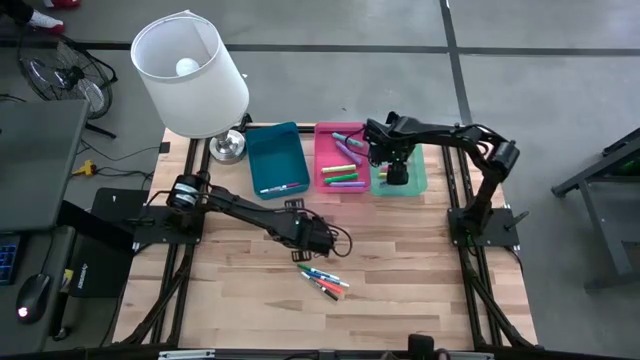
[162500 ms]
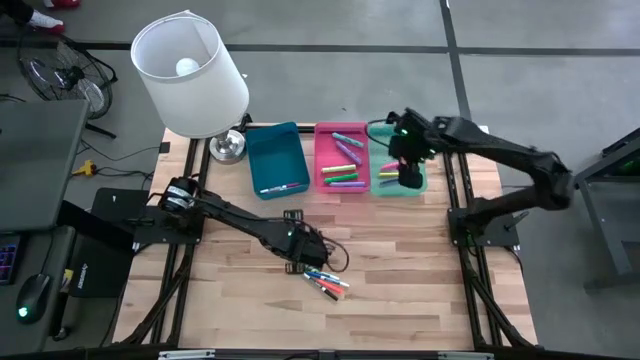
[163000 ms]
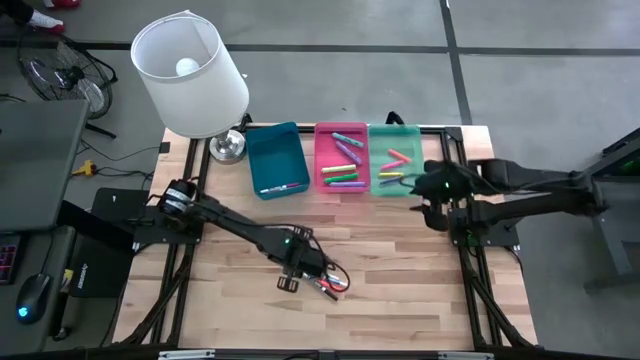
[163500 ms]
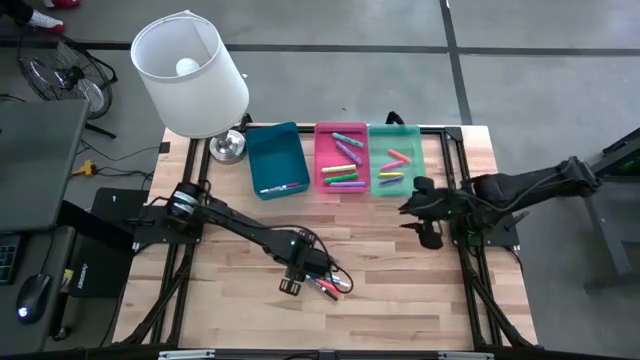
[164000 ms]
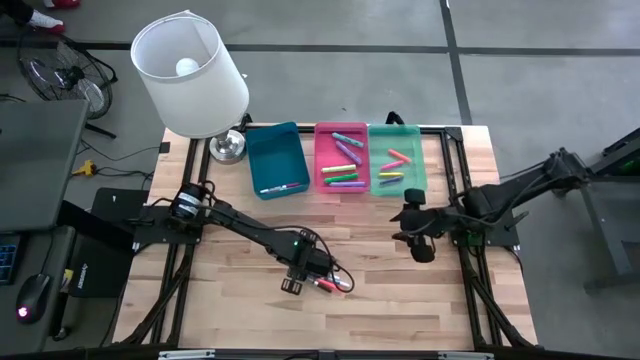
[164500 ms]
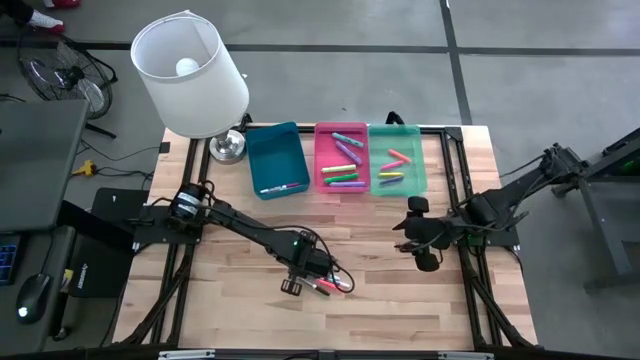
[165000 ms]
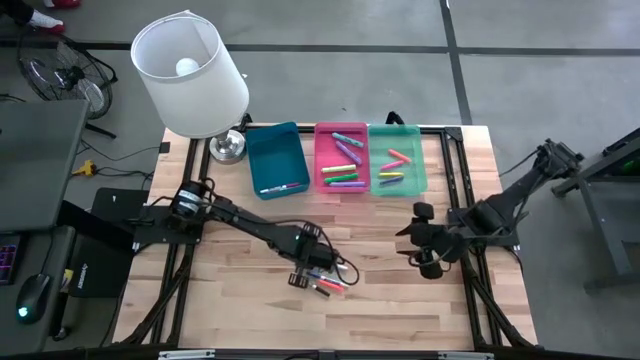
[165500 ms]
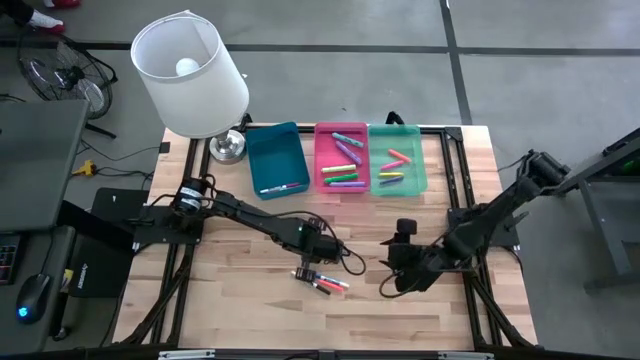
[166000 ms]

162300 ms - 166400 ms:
Task: Pick & Place Markers
Put the green dry erase marker into the dark blue bin

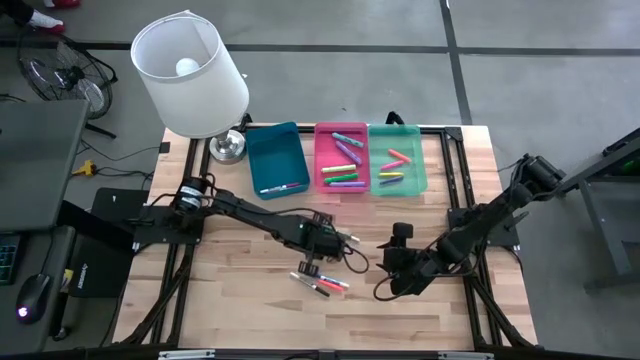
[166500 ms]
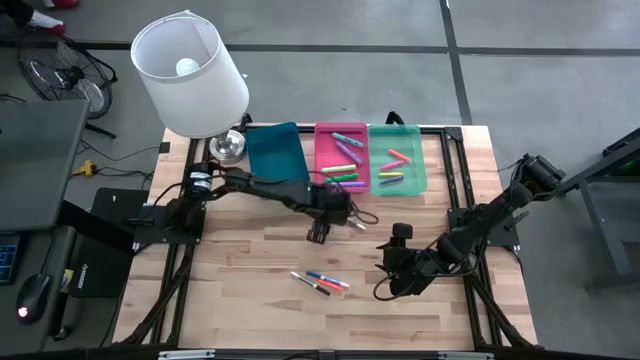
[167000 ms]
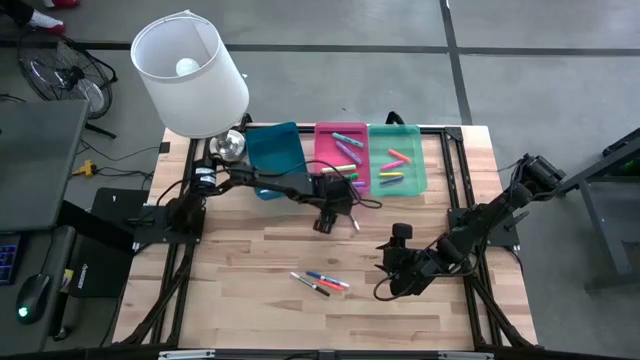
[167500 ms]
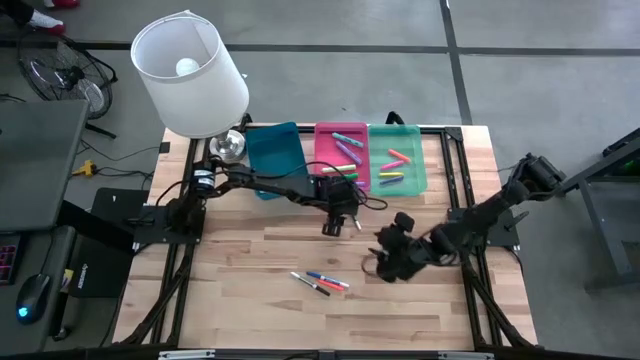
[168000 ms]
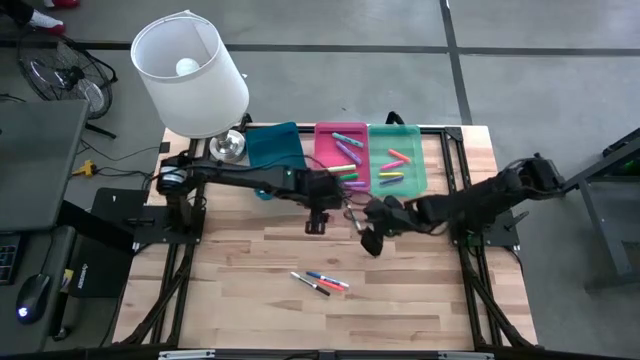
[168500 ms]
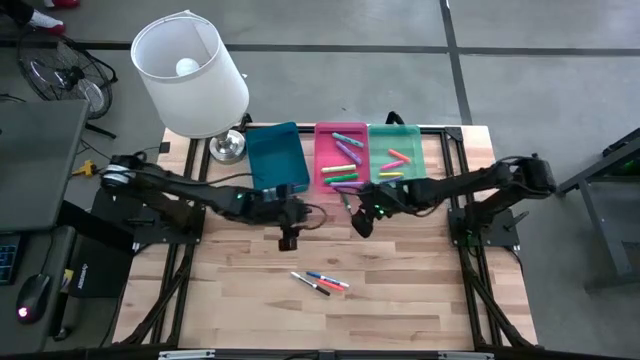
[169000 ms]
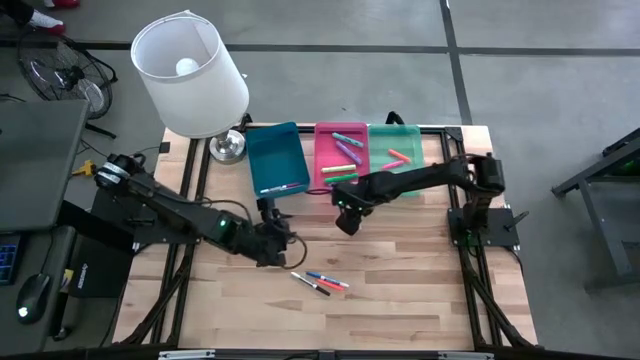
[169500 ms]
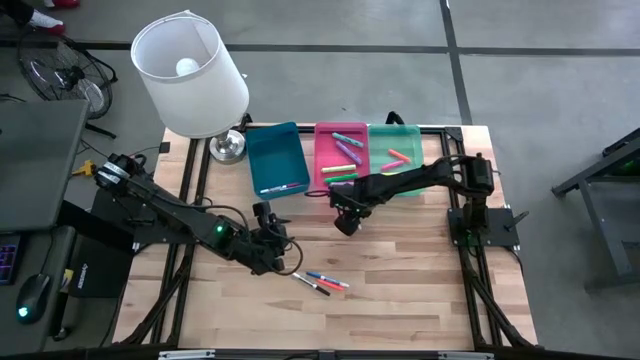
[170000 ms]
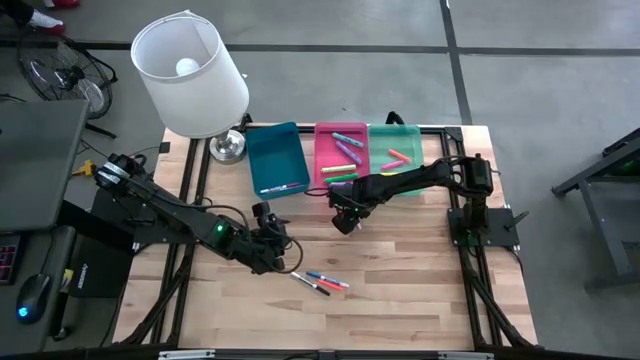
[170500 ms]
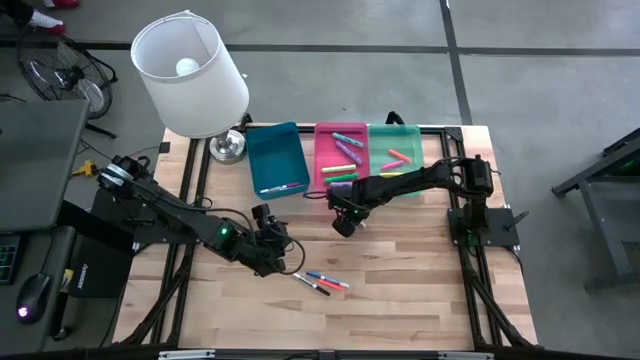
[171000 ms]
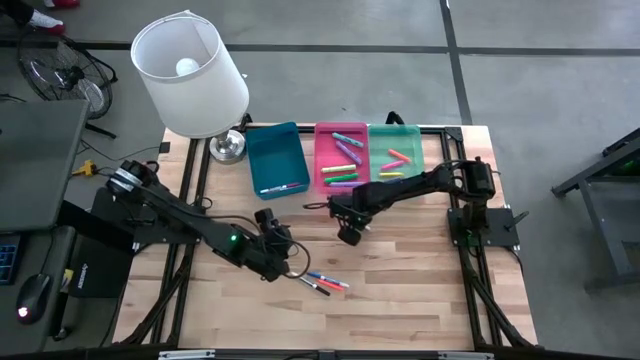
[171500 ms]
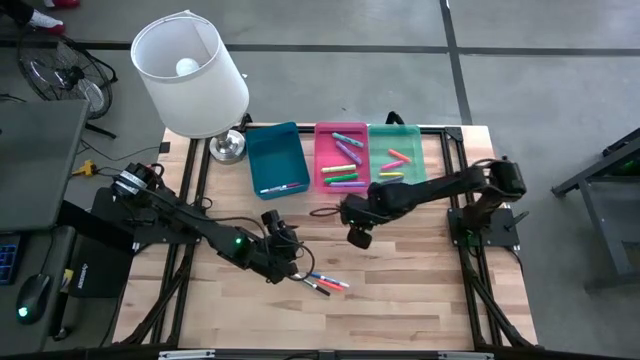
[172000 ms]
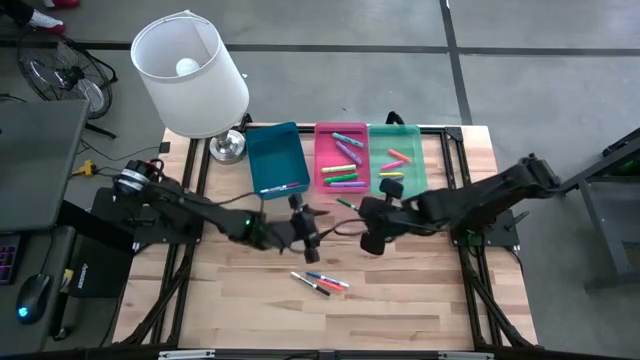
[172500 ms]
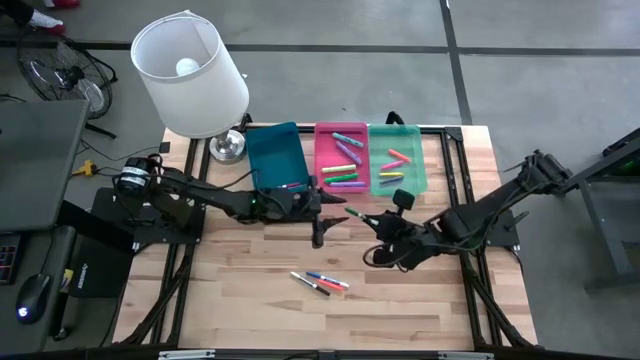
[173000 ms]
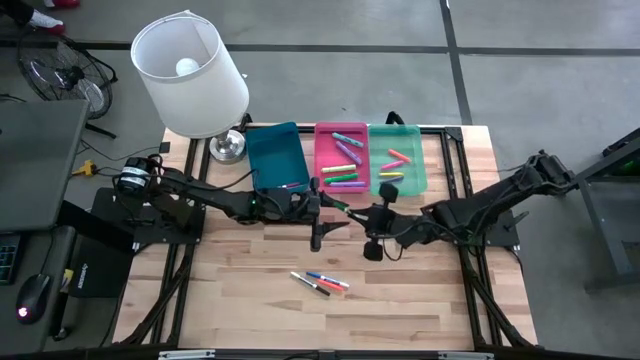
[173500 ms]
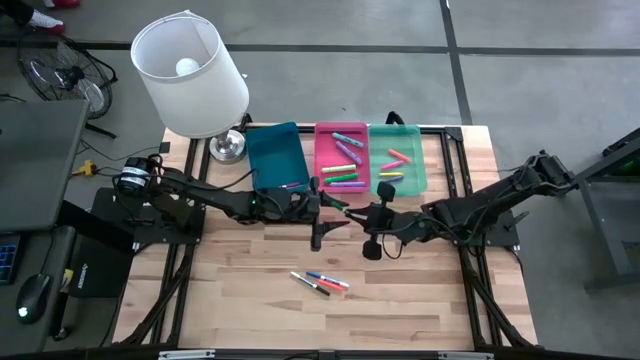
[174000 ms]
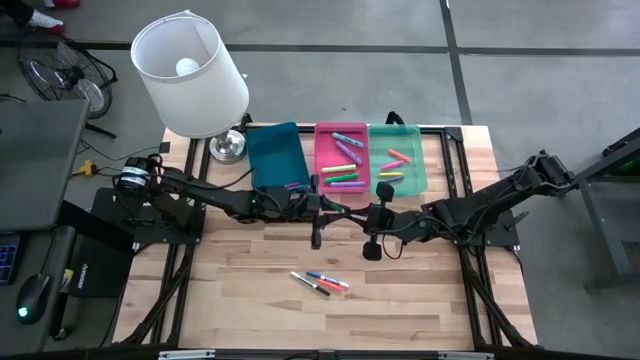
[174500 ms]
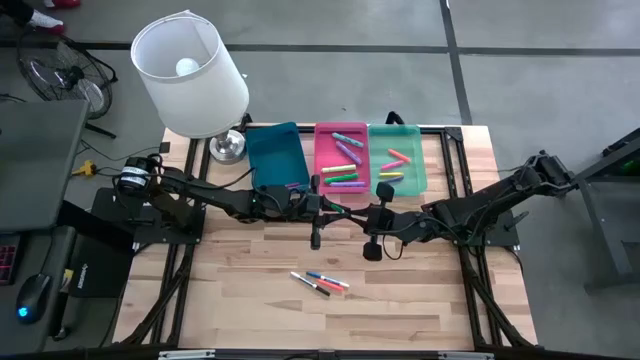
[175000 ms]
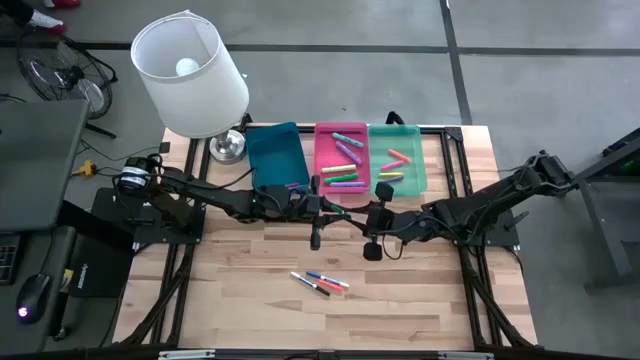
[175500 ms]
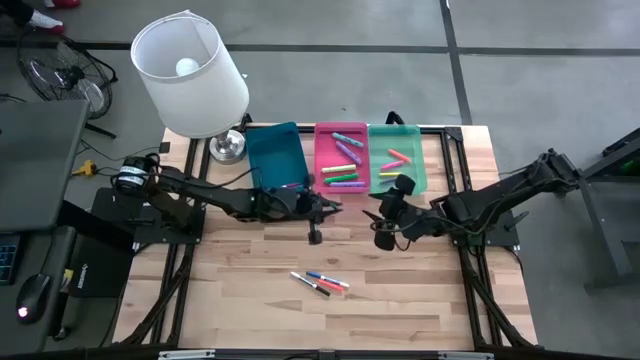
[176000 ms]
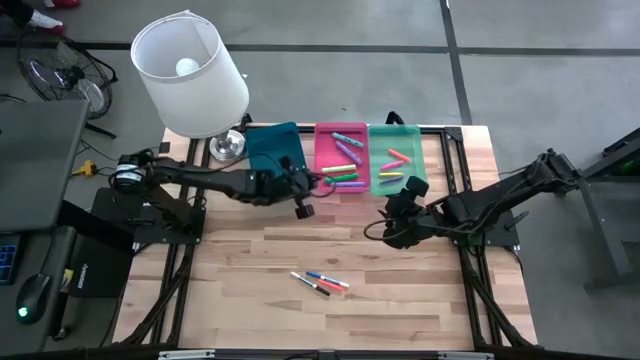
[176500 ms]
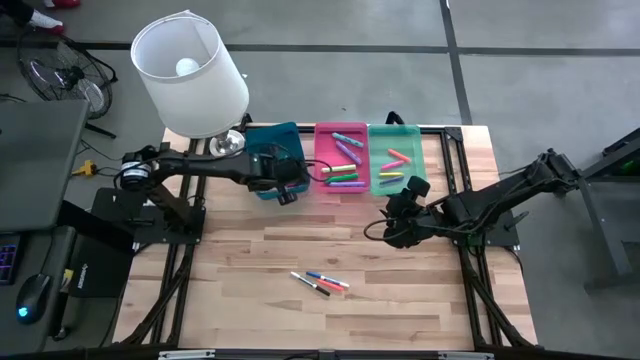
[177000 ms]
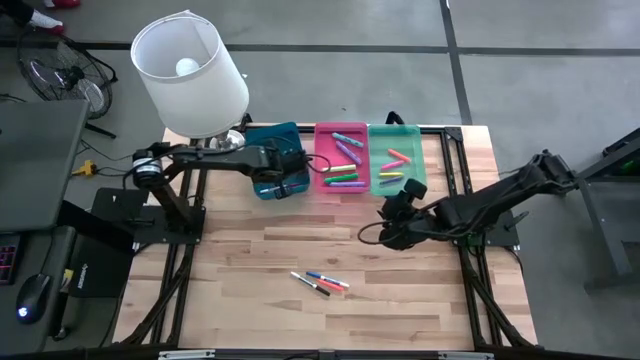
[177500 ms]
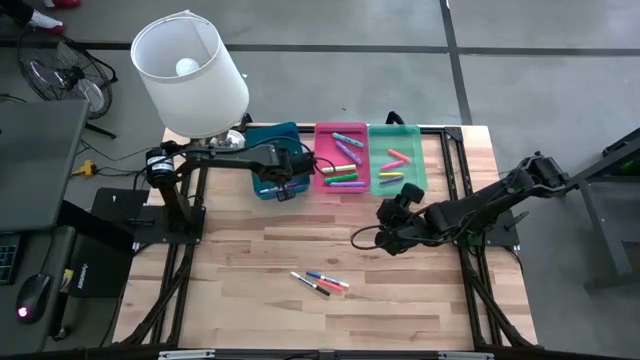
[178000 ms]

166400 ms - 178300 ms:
Put the green dry erase marker into the dark blue bin

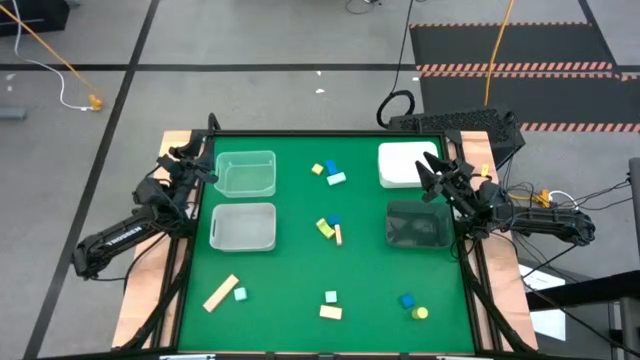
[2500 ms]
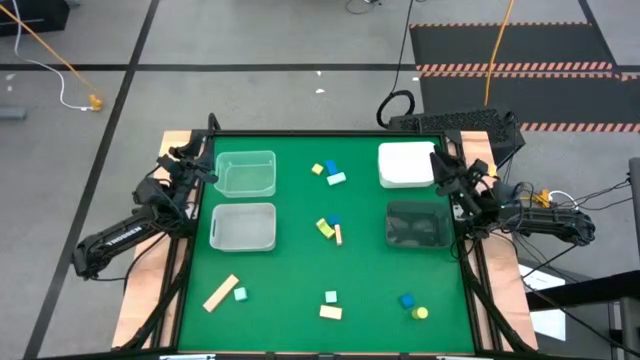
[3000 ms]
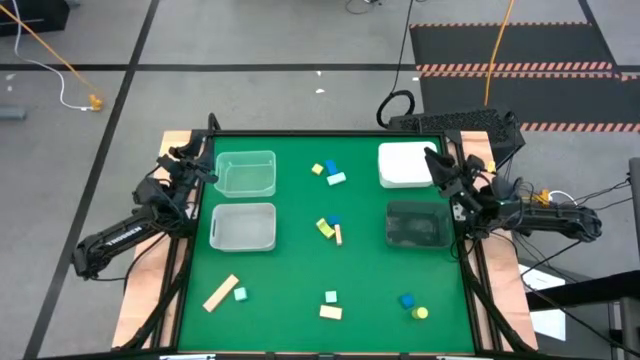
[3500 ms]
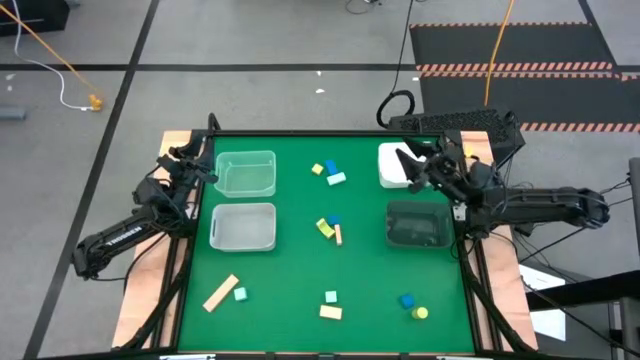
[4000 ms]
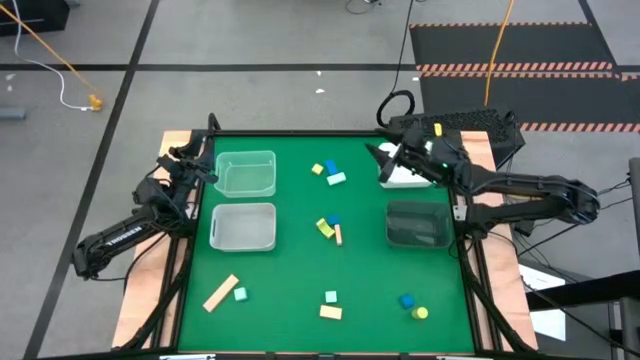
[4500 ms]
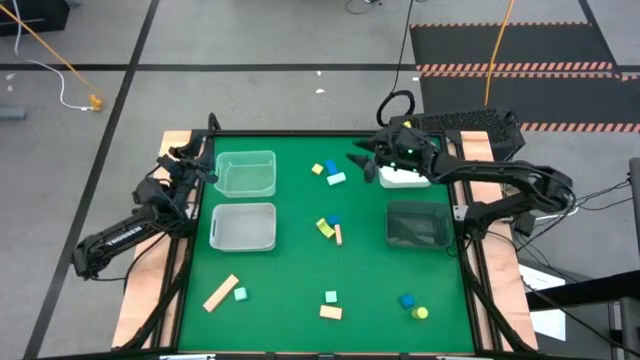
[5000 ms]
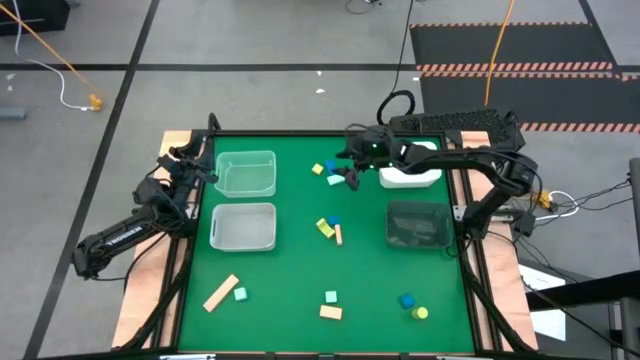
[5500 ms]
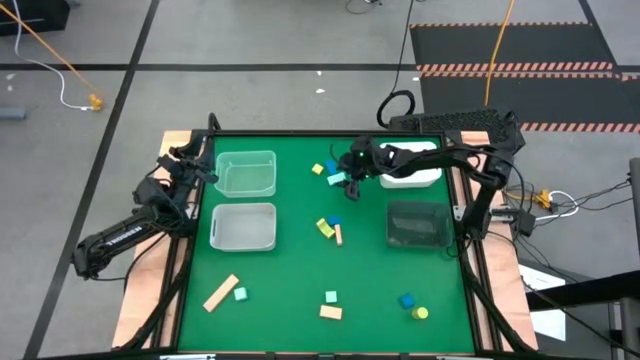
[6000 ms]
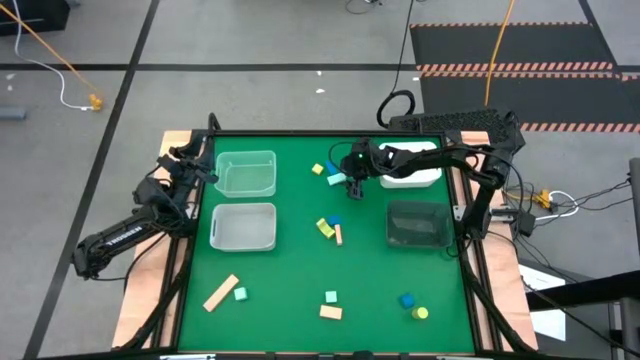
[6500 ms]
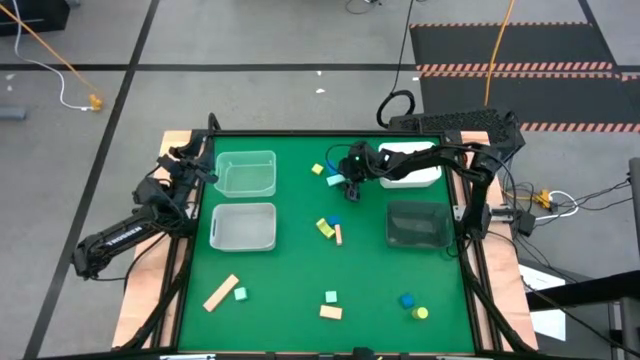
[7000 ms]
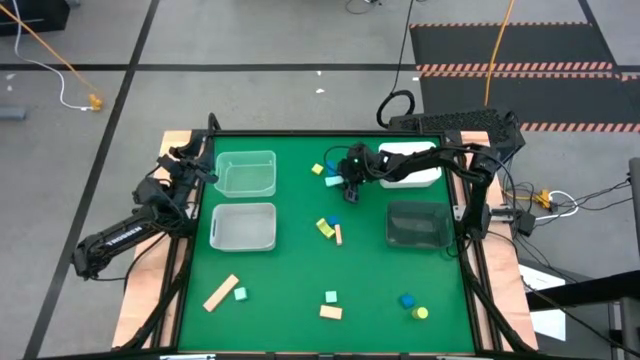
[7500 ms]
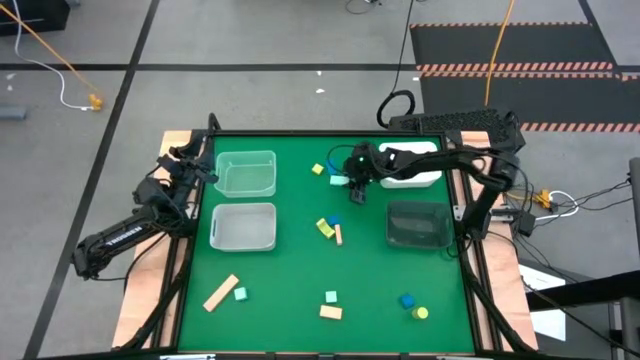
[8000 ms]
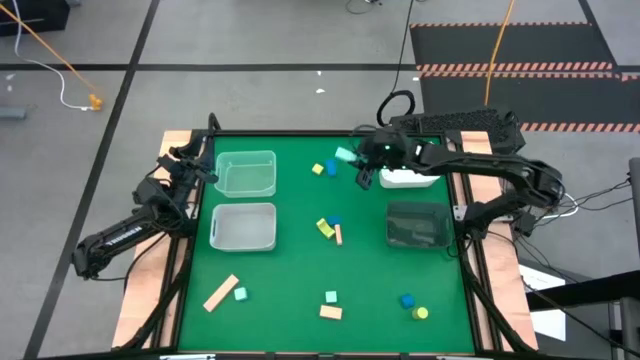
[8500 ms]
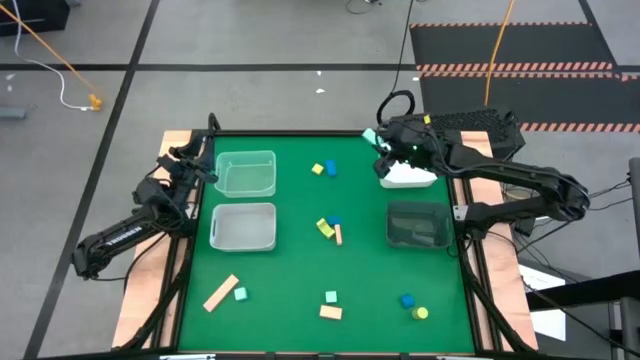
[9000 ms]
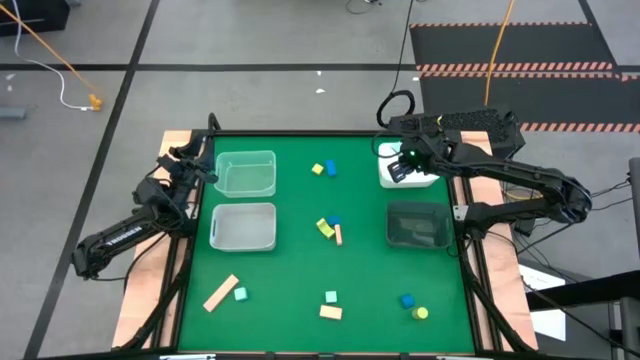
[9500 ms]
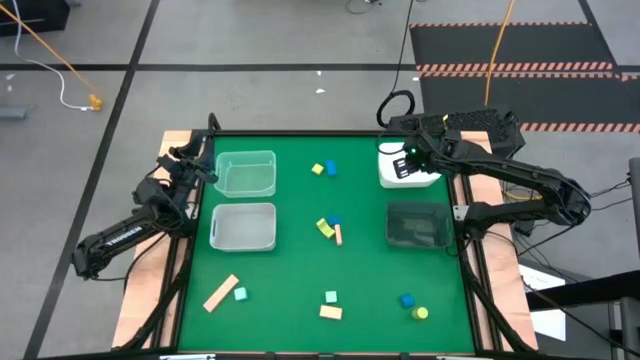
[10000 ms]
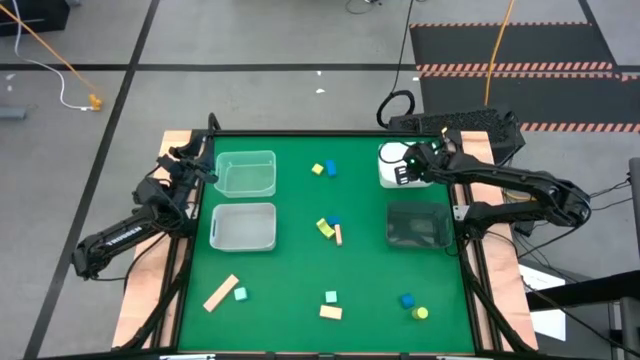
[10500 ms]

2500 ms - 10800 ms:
Task: Sort & place blocks by color
Put the top light blue block into the white bin
